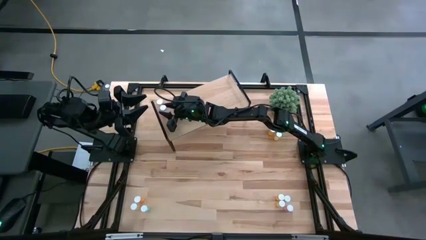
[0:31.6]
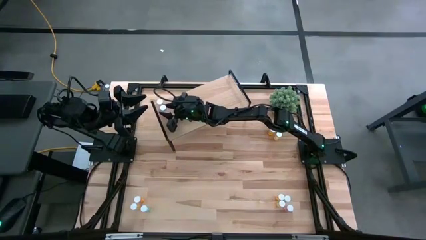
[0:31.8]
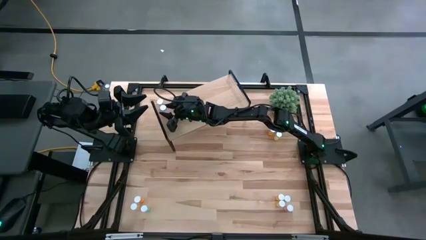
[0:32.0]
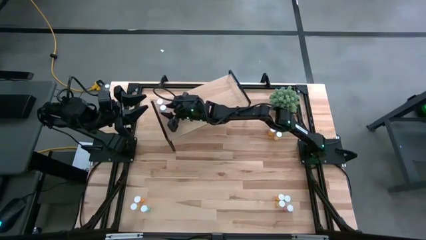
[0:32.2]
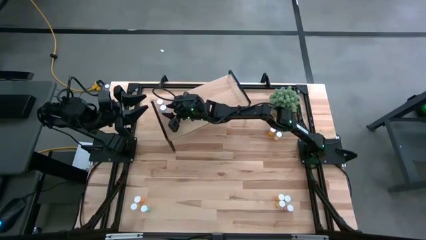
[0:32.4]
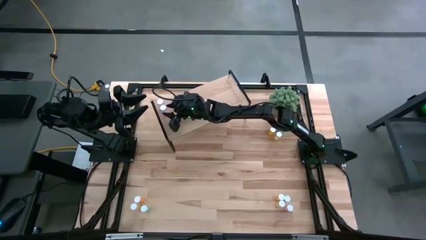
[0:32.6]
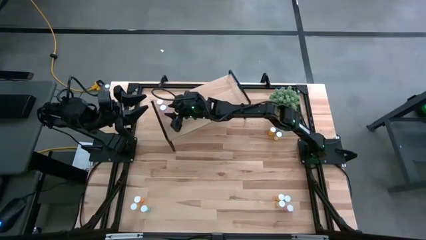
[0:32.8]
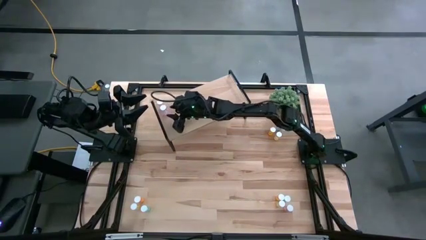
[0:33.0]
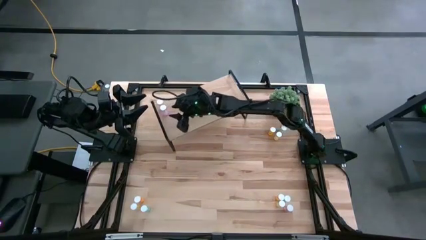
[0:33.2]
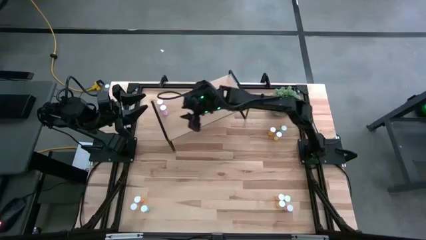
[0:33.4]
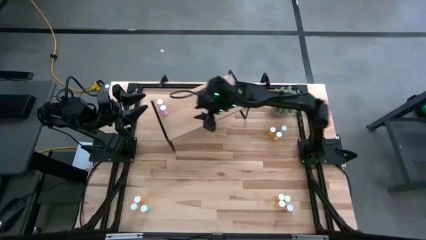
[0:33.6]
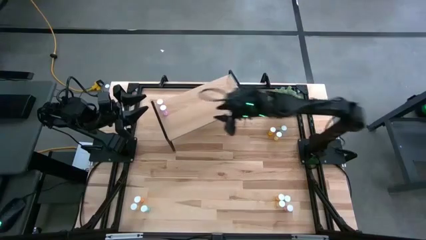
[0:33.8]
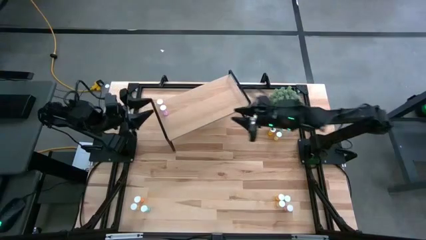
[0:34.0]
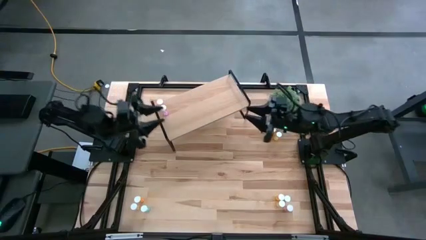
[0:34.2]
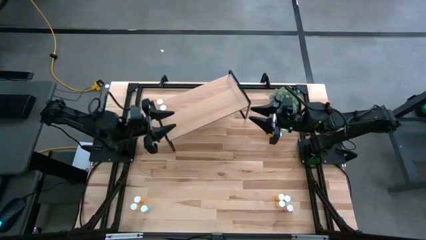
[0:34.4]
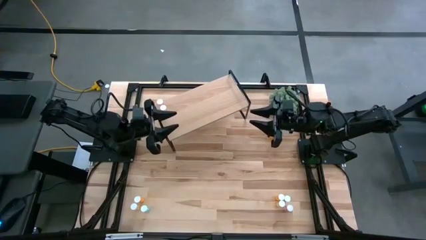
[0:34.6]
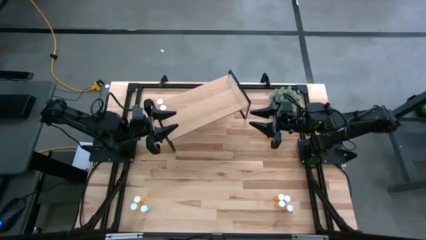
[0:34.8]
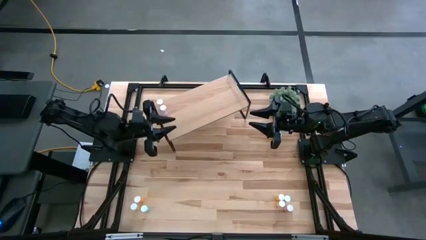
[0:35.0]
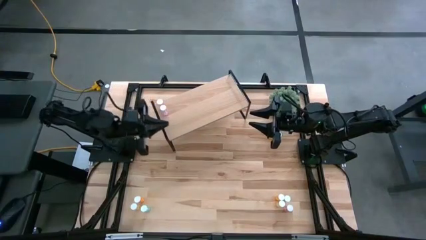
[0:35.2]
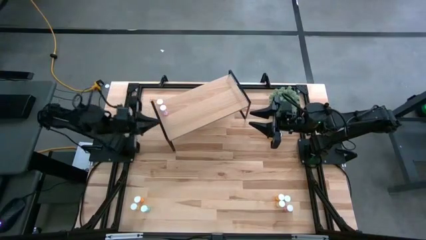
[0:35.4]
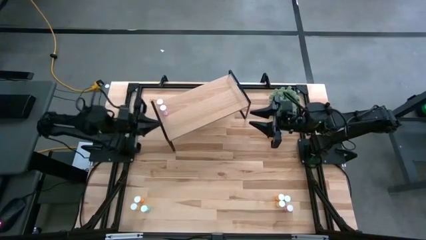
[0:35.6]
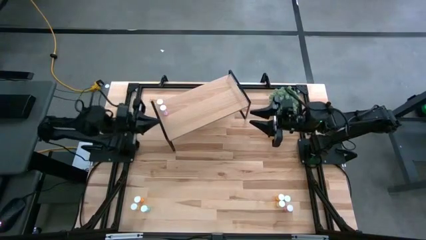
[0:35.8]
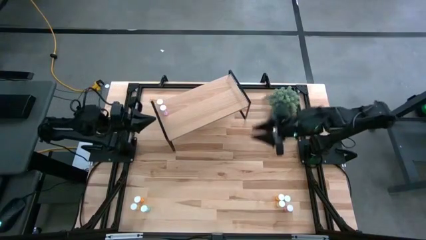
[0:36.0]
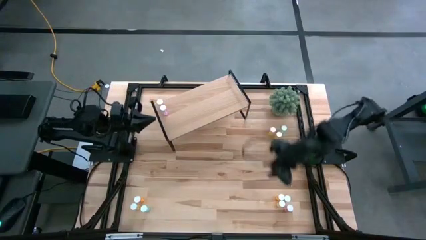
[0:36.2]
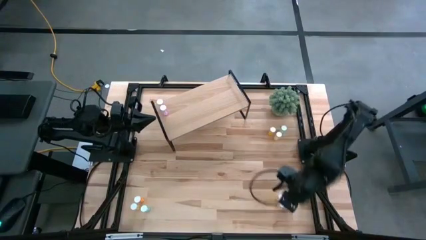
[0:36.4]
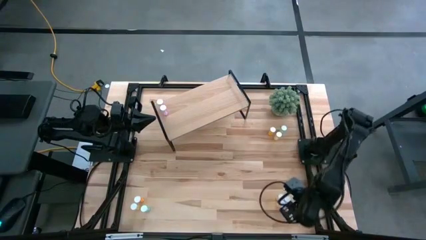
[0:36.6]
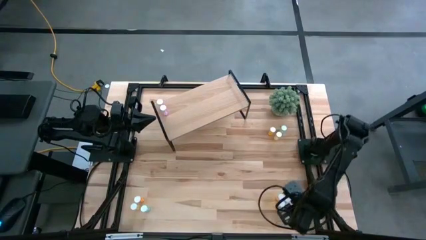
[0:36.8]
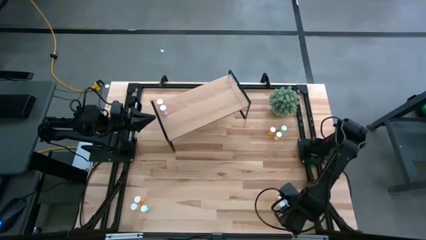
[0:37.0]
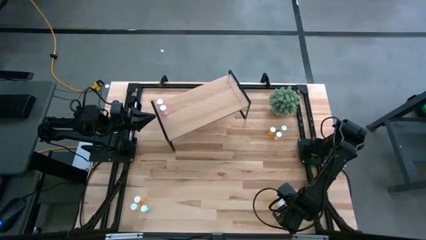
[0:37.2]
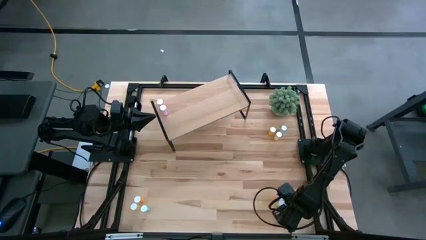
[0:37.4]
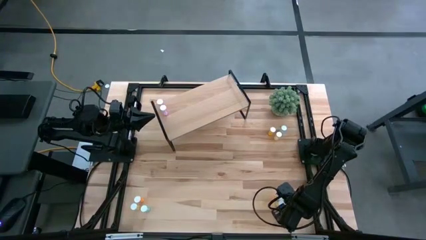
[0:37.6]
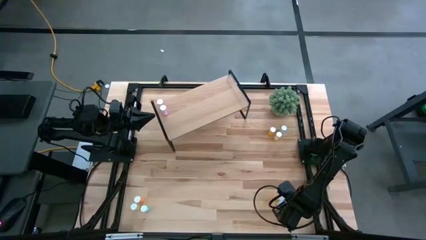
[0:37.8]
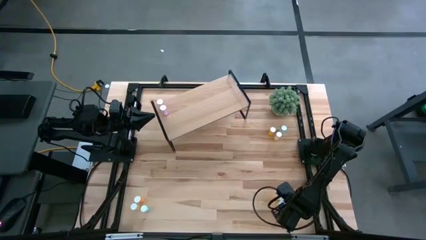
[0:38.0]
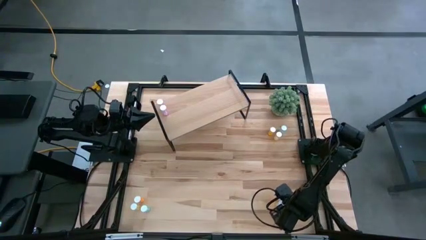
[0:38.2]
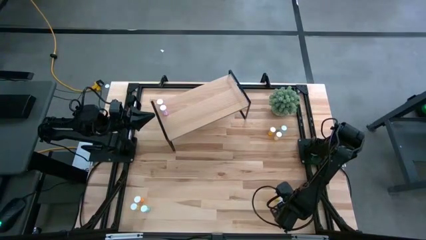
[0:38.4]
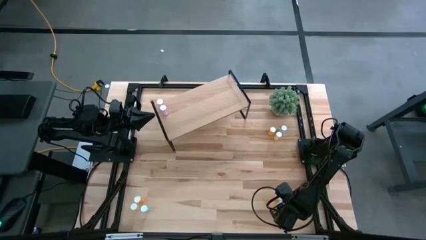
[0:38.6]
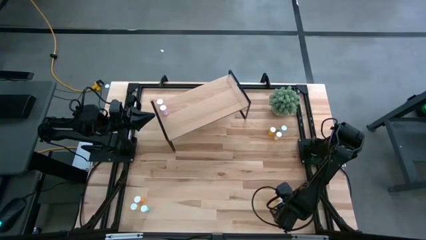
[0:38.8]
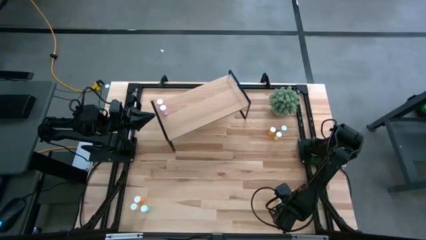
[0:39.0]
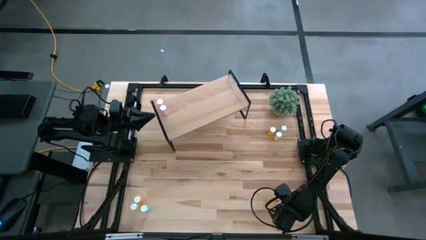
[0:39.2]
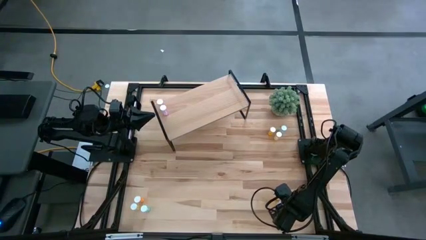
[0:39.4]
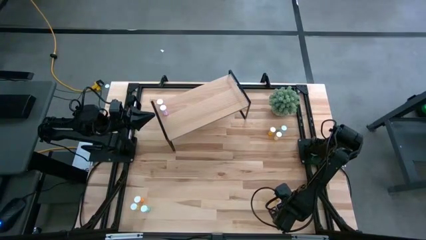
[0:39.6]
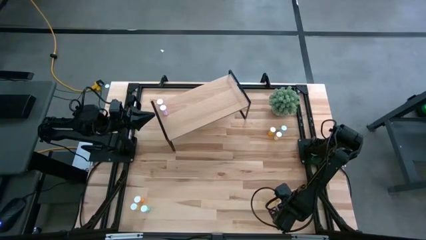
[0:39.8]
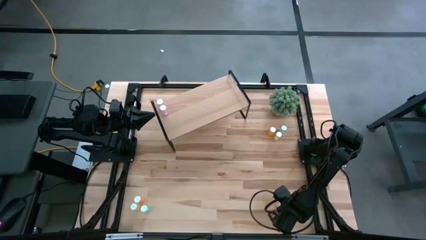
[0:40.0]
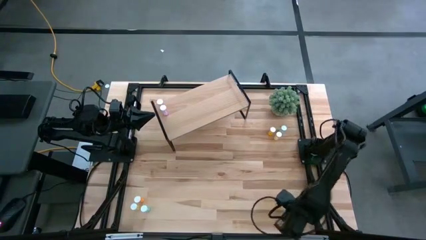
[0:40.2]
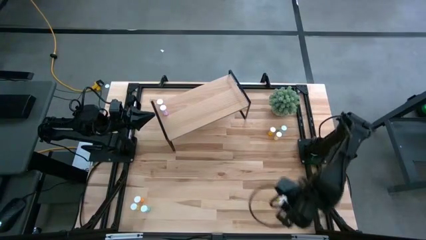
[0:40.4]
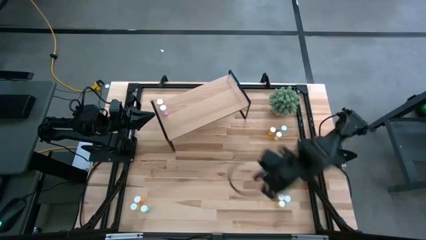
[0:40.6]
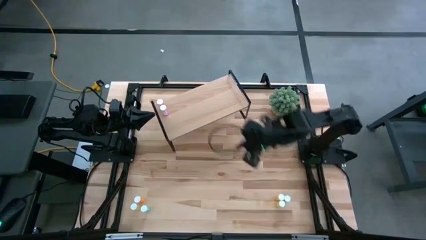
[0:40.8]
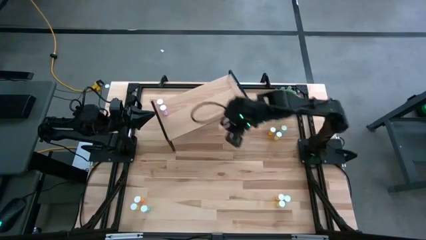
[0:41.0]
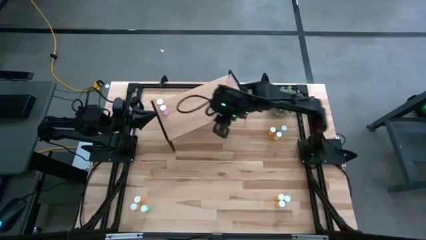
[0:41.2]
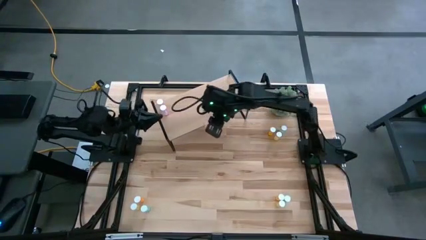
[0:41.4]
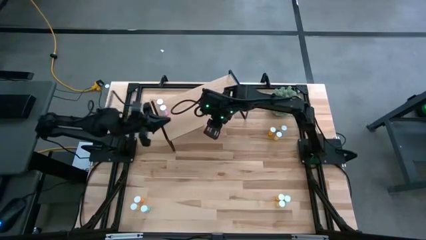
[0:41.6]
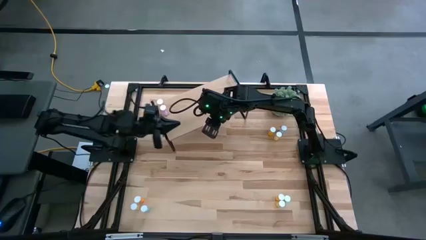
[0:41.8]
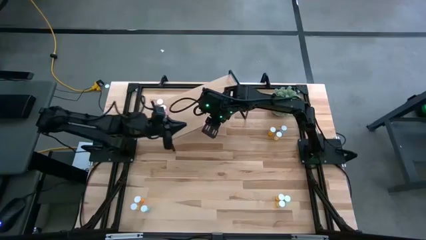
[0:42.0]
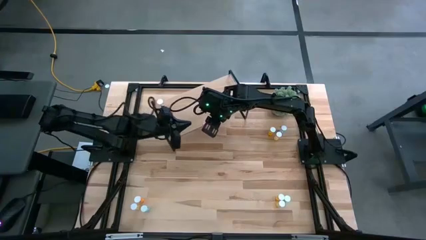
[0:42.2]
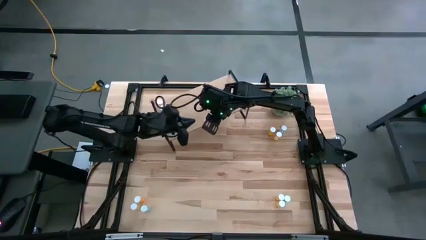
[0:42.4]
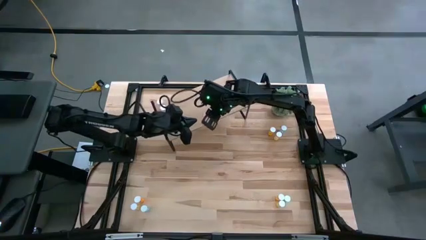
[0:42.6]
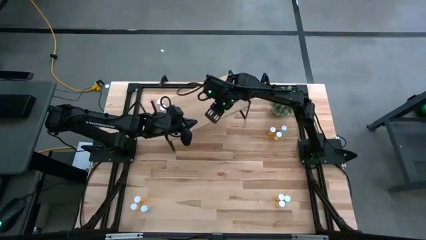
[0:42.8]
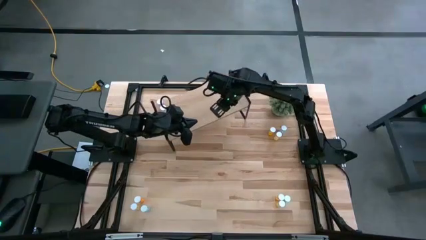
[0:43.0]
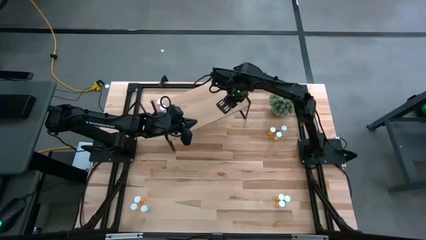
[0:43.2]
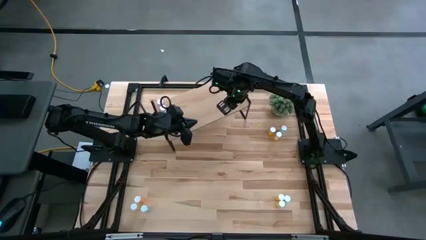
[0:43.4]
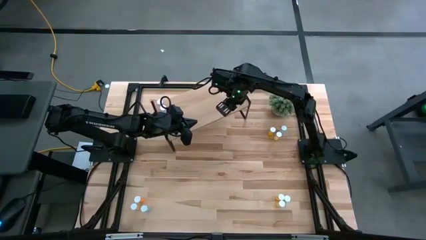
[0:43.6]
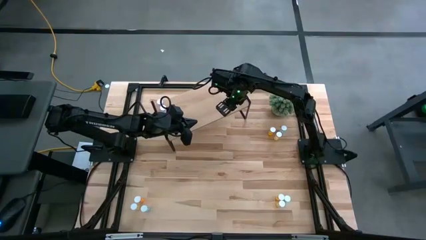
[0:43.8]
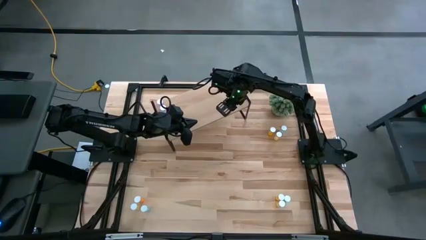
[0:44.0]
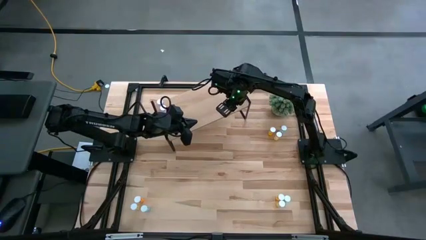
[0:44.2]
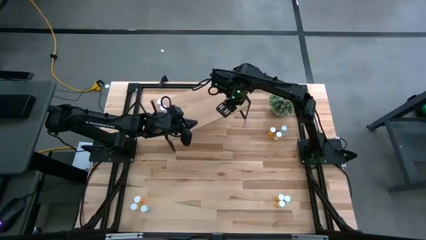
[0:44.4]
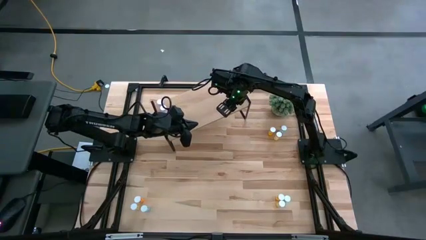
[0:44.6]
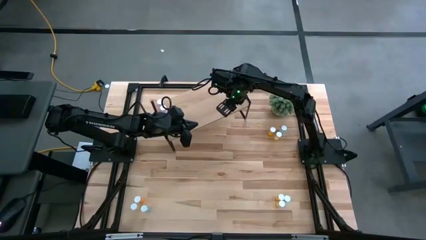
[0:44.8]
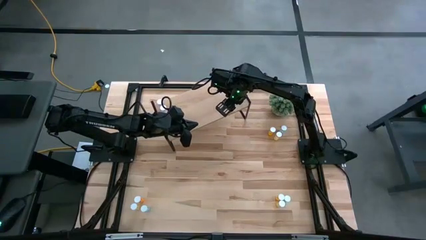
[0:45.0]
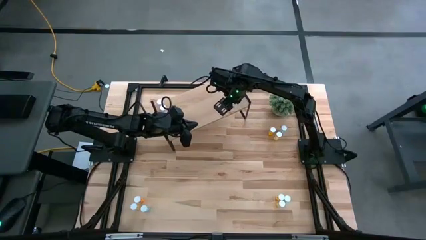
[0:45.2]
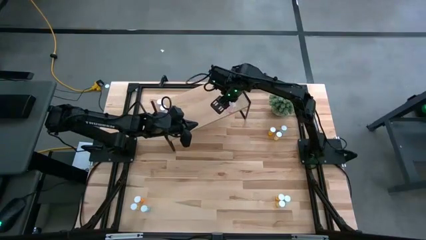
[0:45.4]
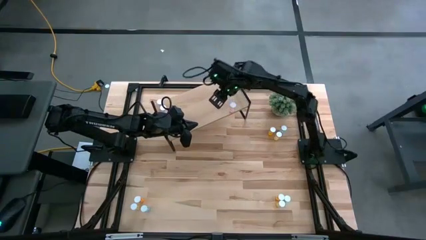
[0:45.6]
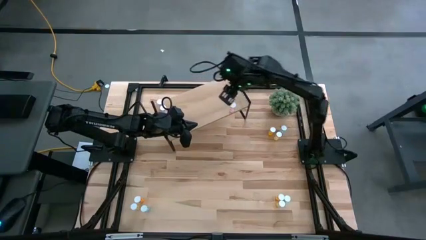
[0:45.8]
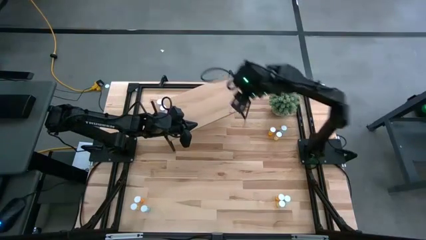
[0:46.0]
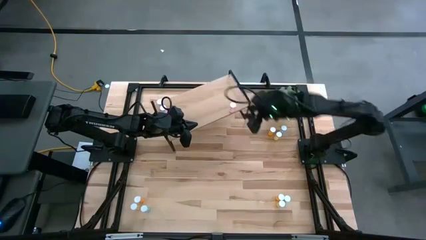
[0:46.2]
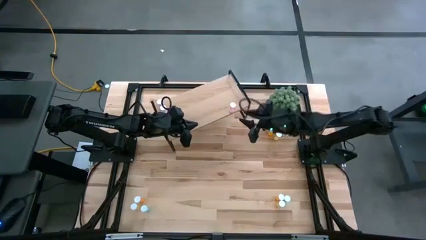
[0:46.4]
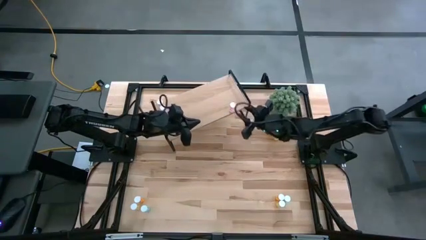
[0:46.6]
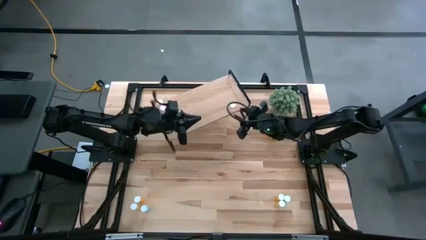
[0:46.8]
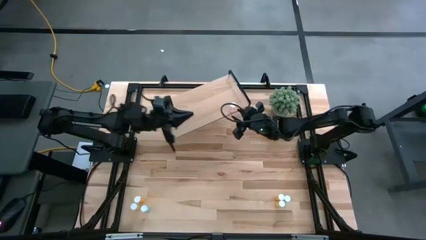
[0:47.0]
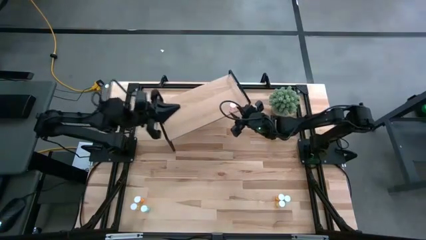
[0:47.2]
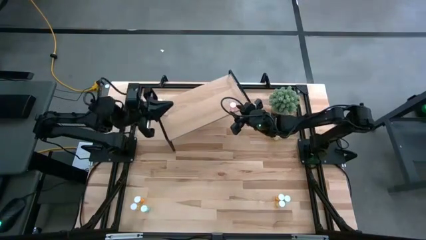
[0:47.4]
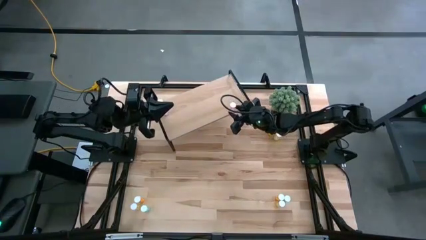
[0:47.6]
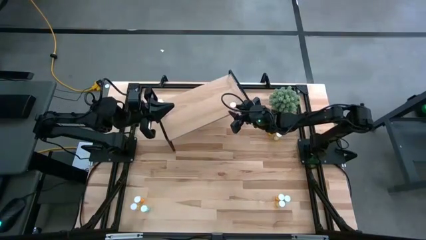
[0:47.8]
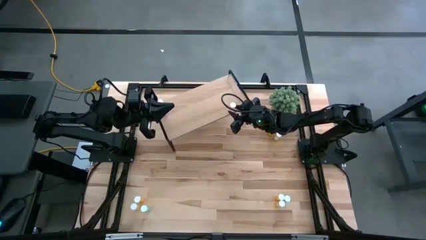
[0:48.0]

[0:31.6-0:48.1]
Task: Pick and place medicine bottles onto shelf by color
Put the pink pill bottle on the shelf aligned with the other pink pill bottles
